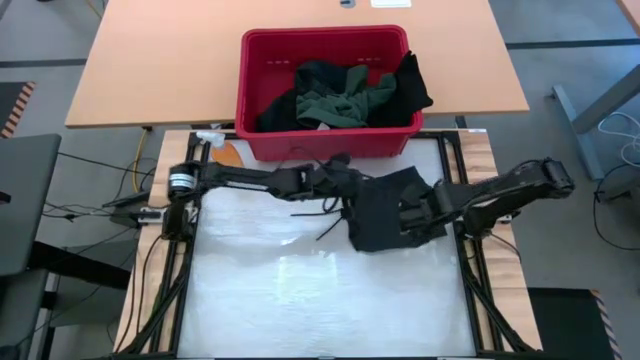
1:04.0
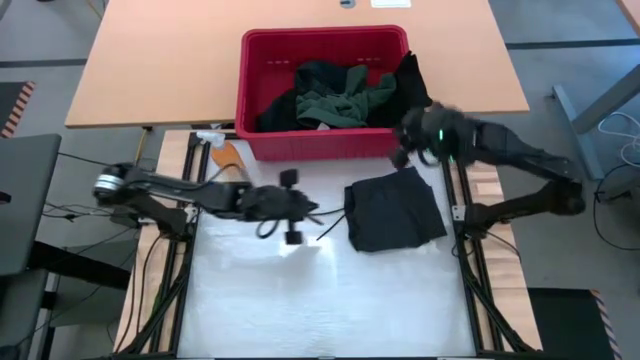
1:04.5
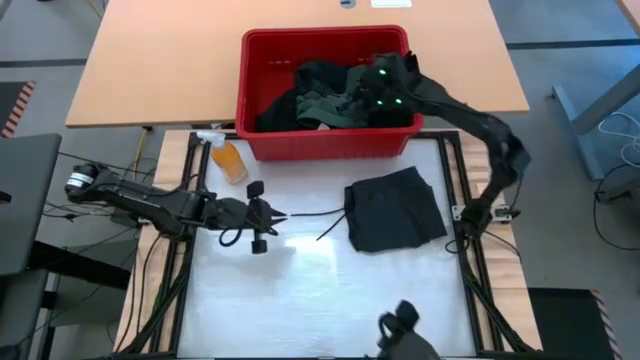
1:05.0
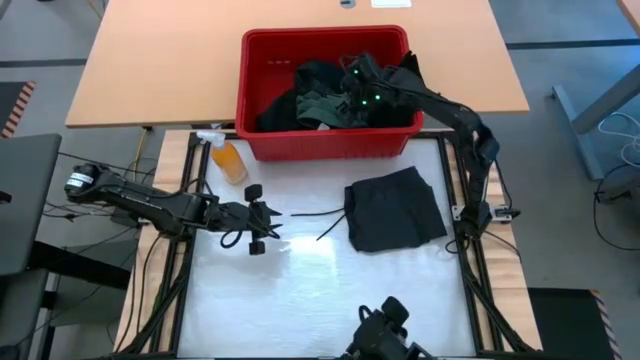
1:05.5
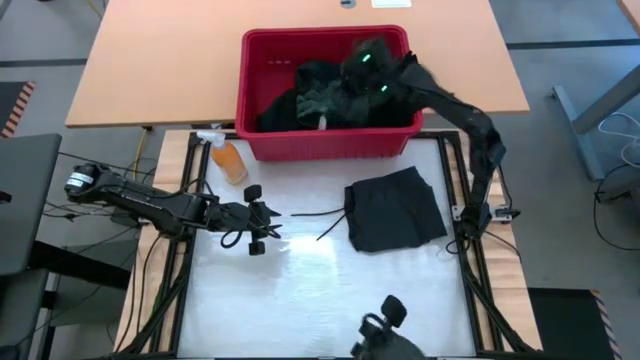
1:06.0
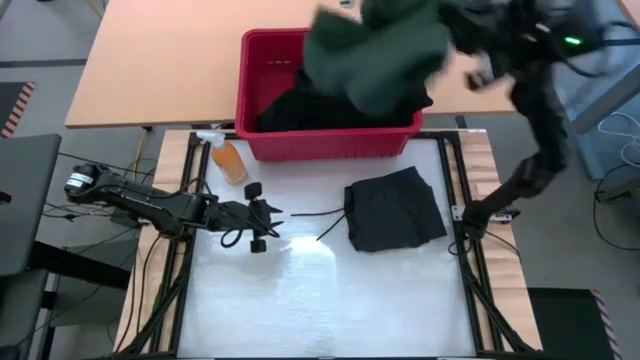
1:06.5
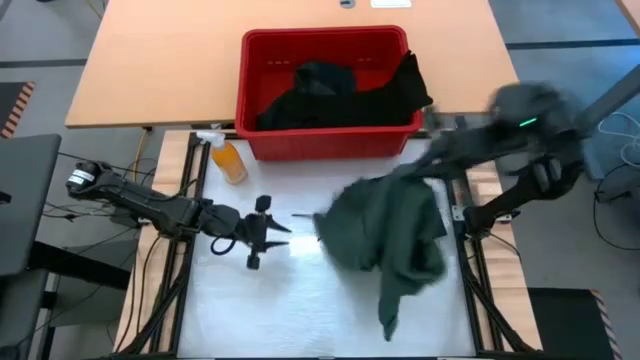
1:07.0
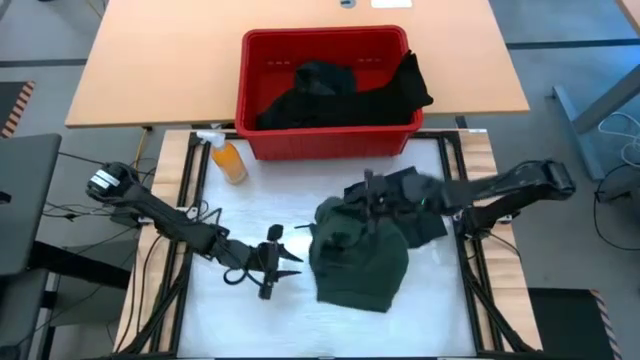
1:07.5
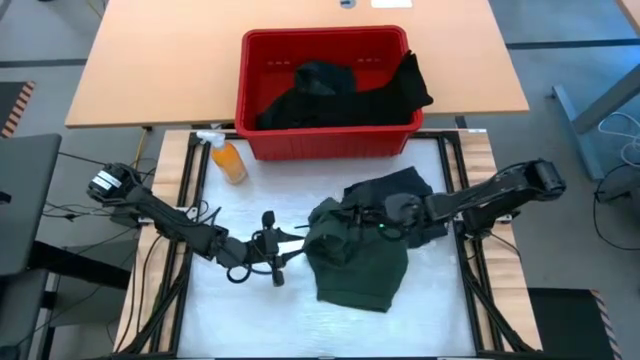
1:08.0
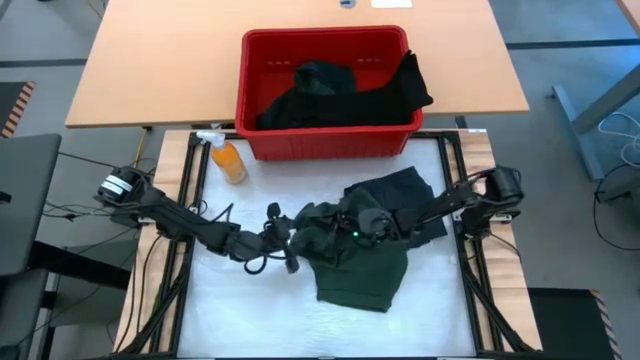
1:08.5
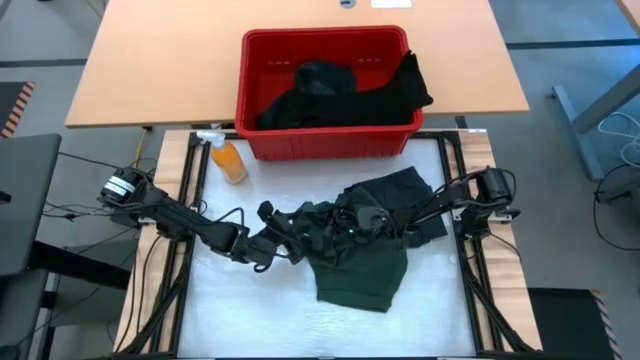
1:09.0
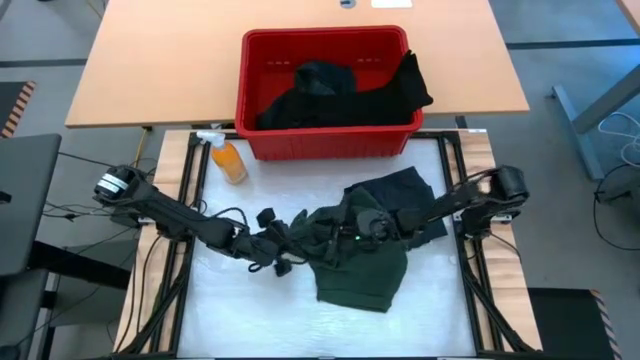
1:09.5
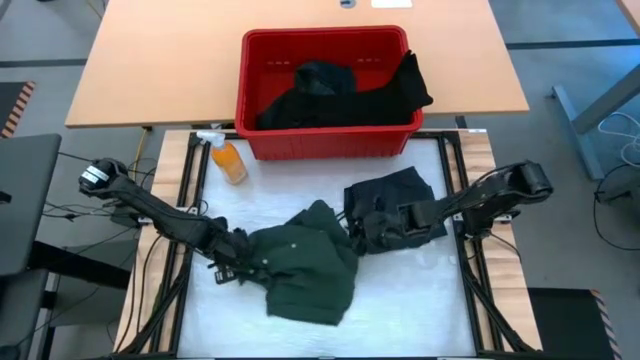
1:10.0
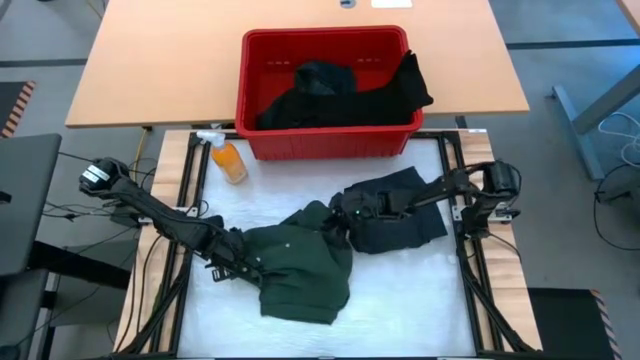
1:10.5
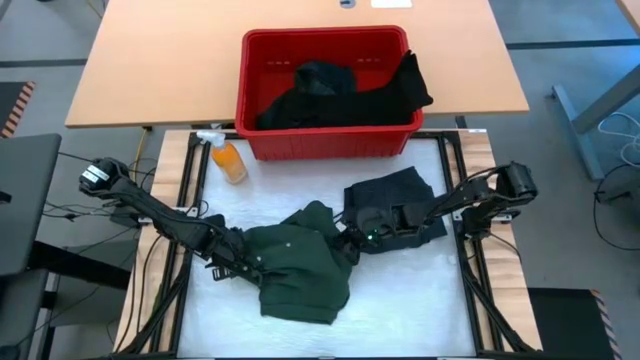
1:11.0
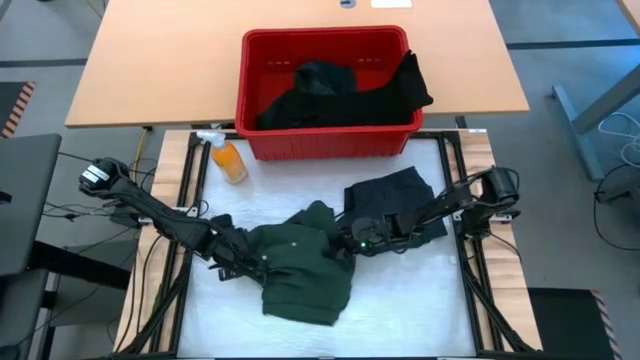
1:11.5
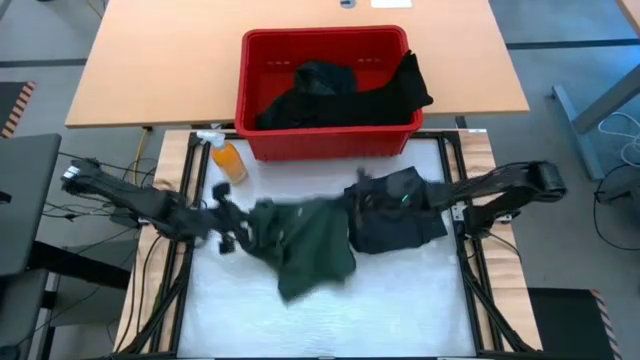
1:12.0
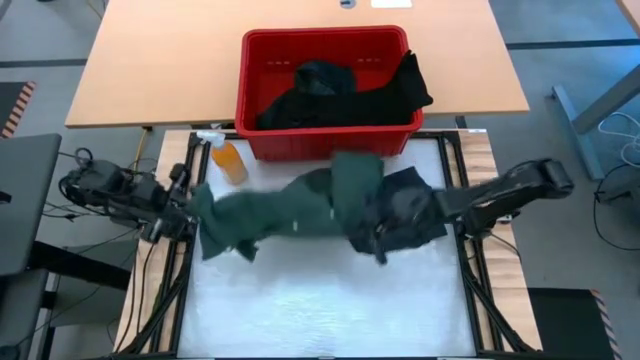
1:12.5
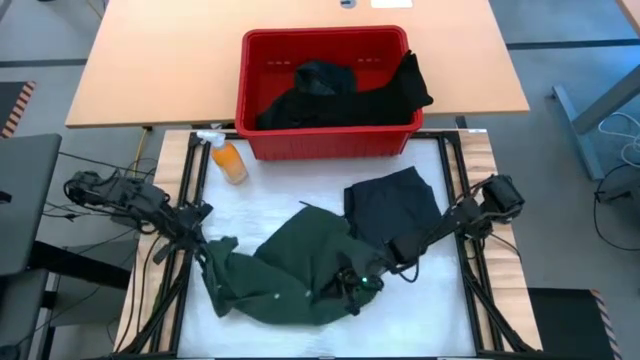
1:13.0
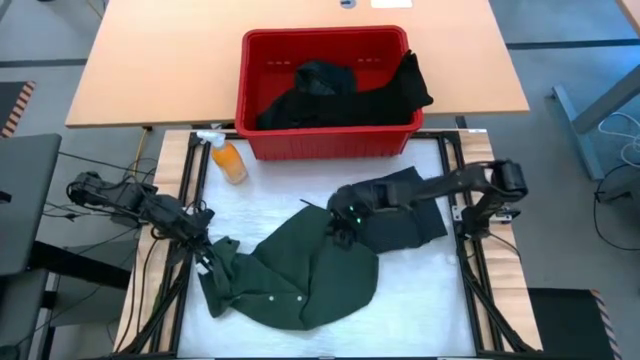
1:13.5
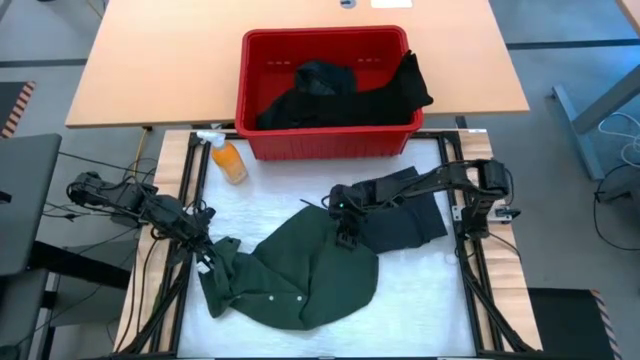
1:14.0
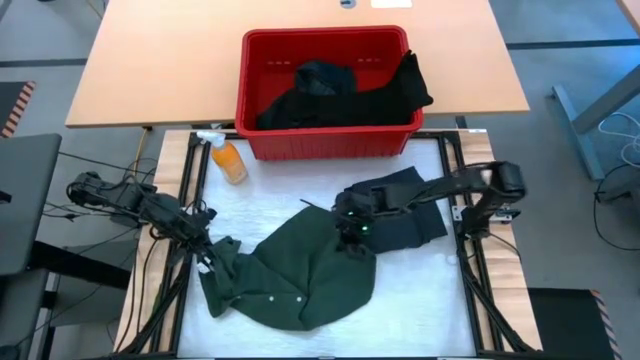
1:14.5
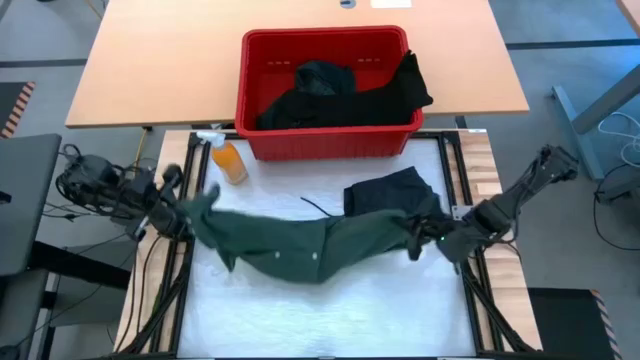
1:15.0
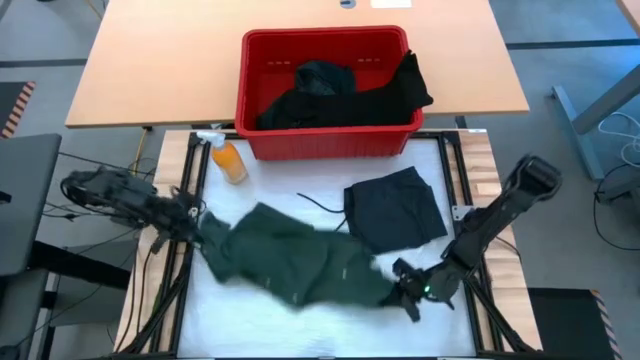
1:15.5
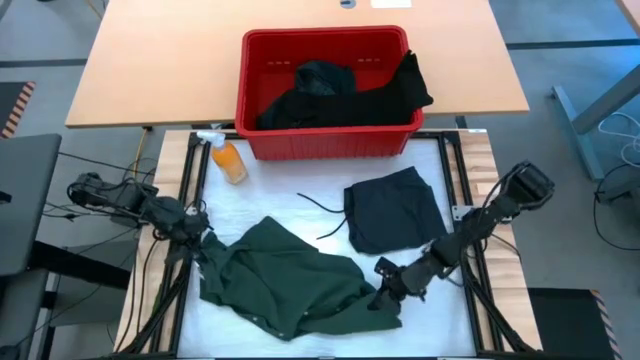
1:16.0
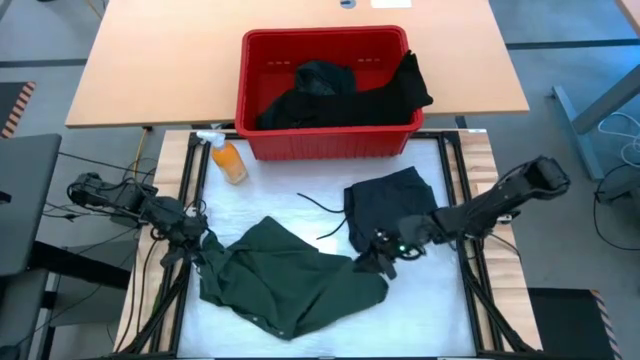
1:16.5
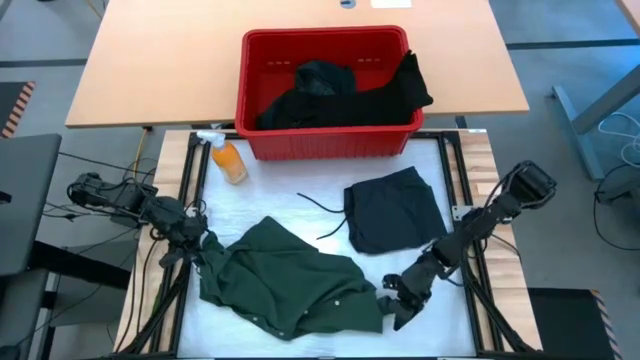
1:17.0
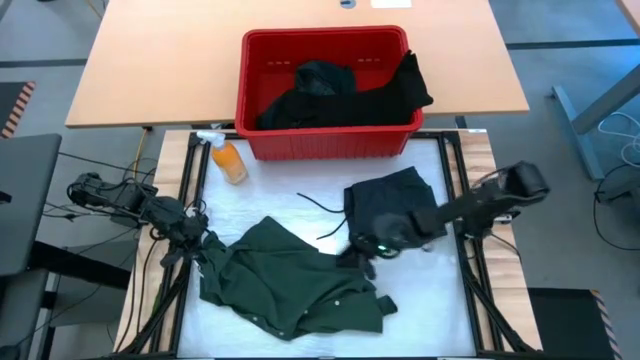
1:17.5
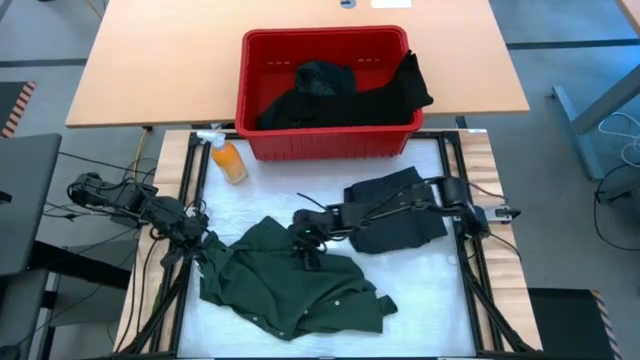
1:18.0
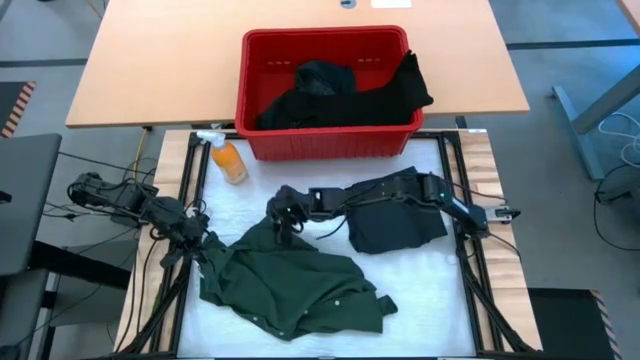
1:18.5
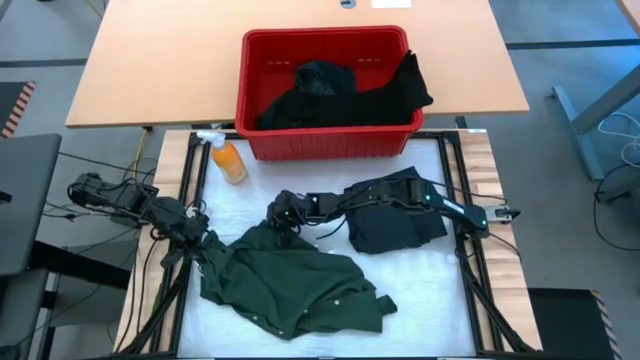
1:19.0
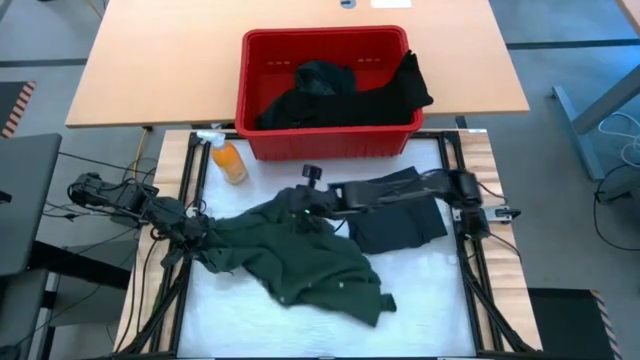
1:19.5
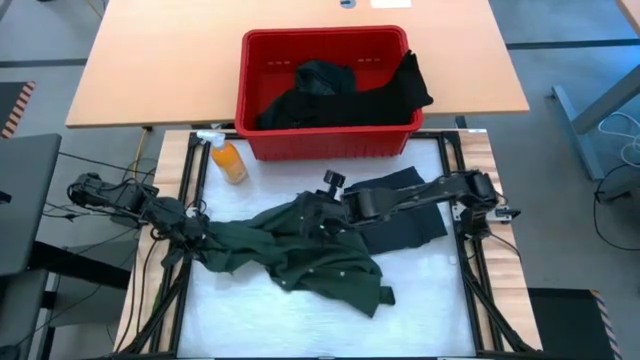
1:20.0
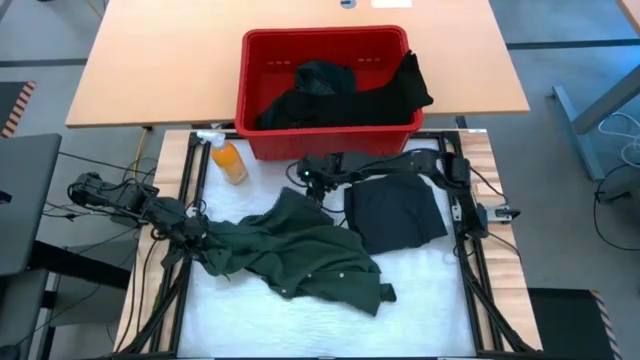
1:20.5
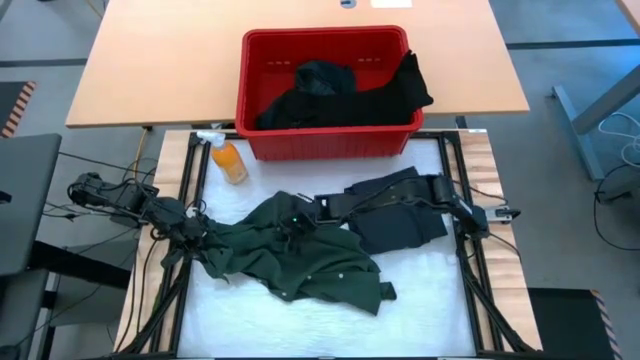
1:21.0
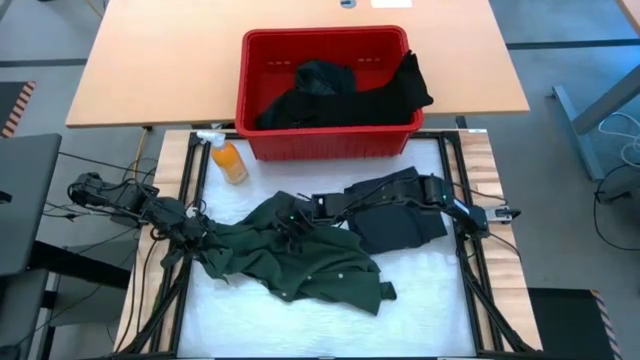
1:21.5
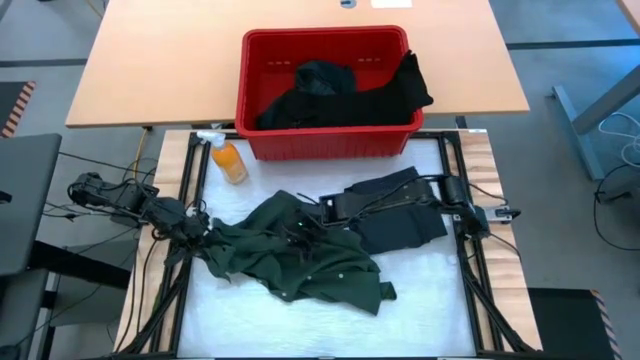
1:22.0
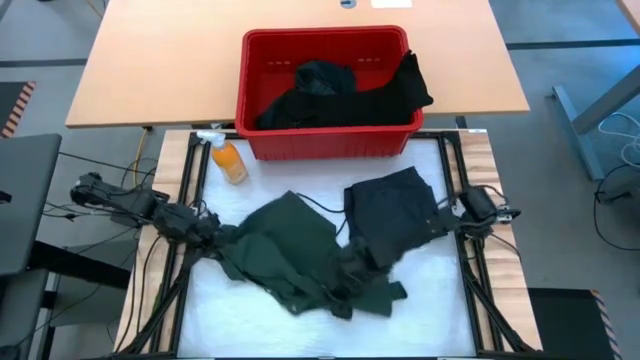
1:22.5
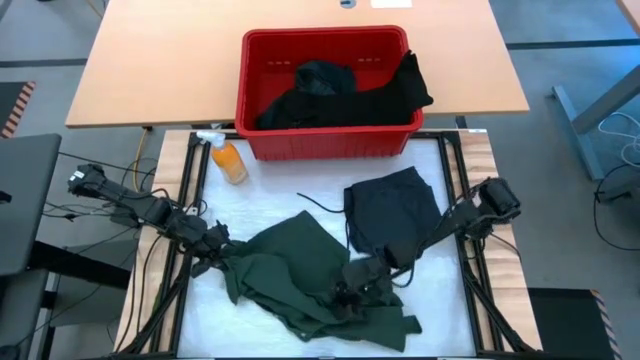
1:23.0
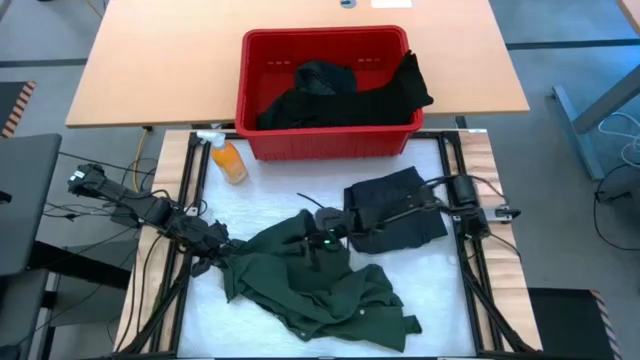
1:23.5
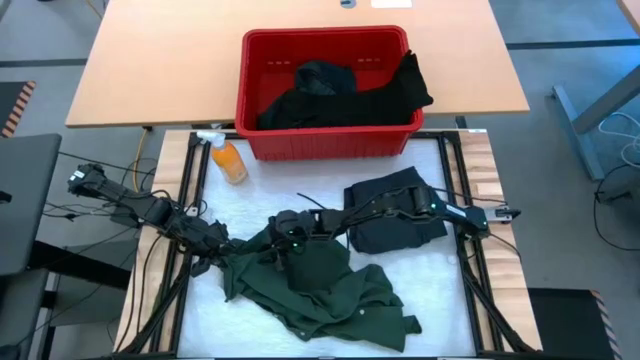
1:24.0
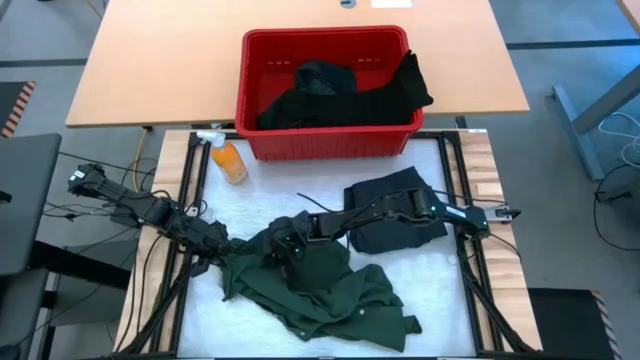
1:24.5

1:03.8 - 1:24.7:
Task: Fold laundry
Fold the dark green shirt
